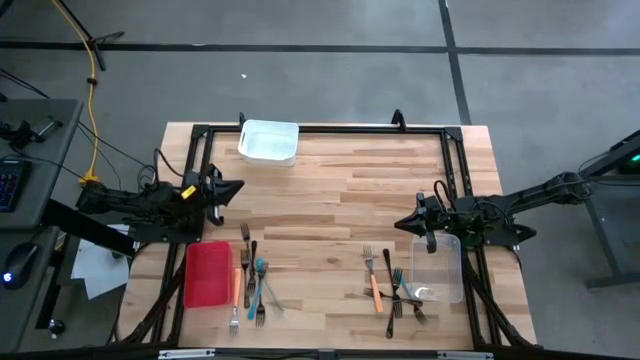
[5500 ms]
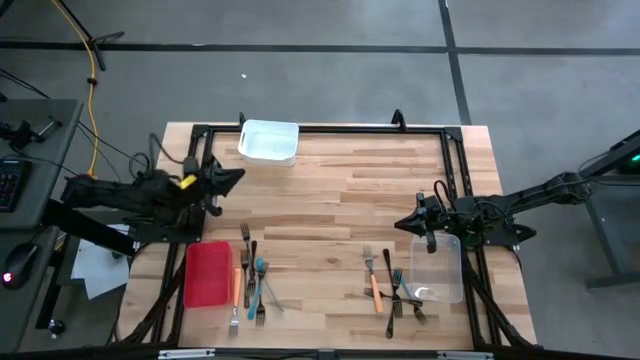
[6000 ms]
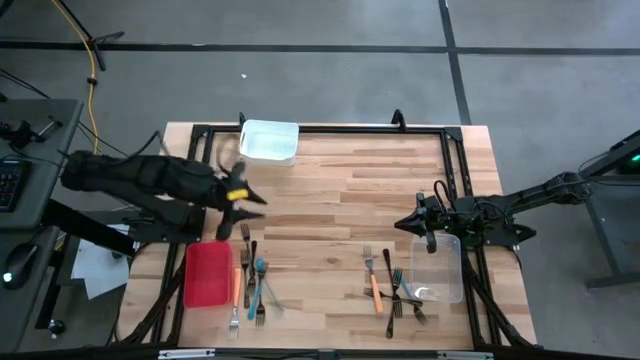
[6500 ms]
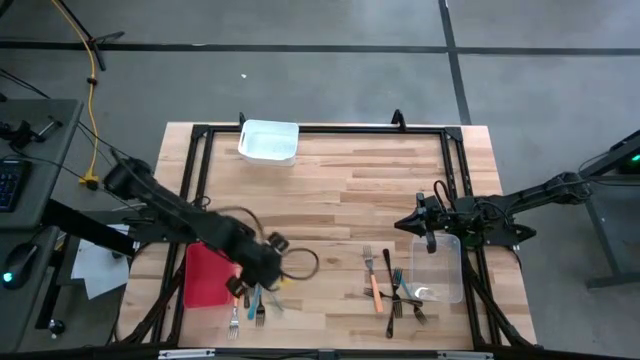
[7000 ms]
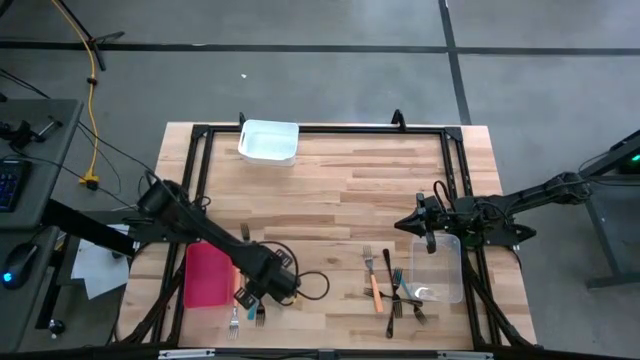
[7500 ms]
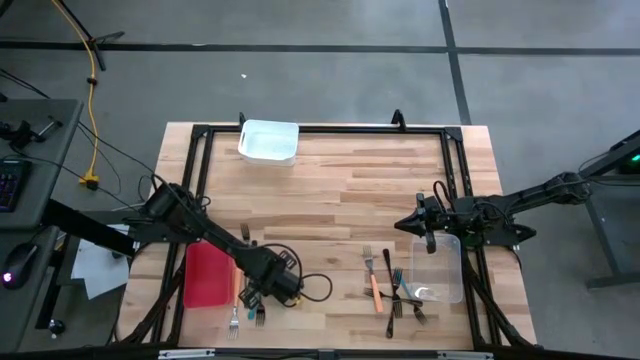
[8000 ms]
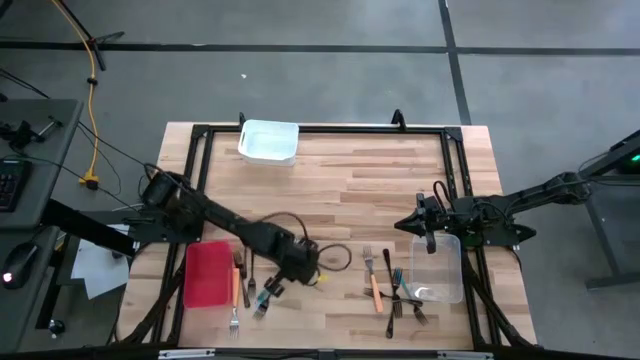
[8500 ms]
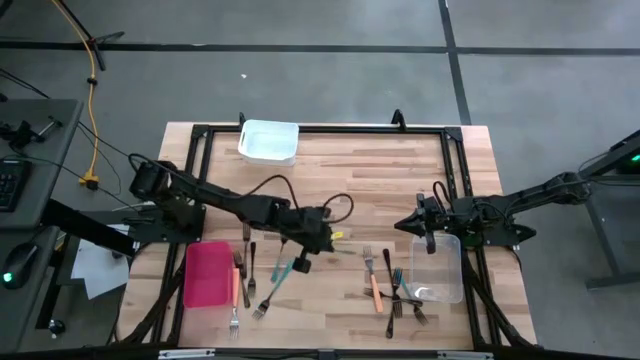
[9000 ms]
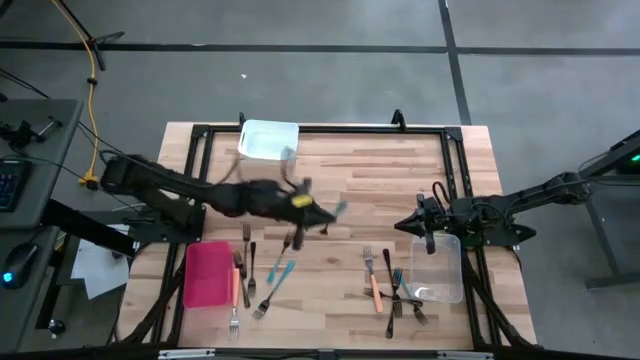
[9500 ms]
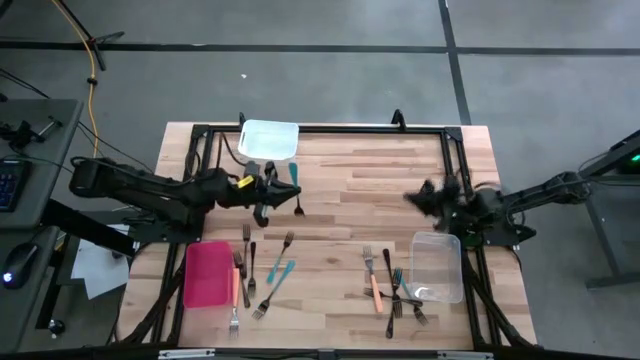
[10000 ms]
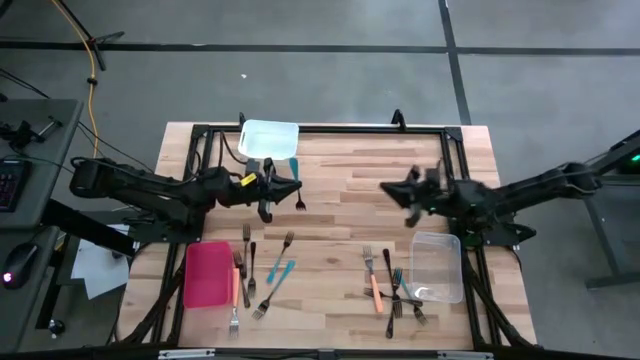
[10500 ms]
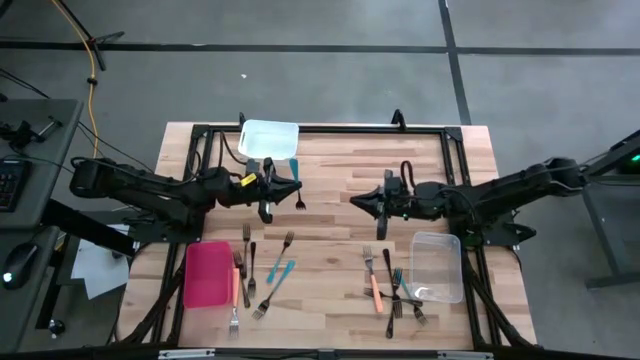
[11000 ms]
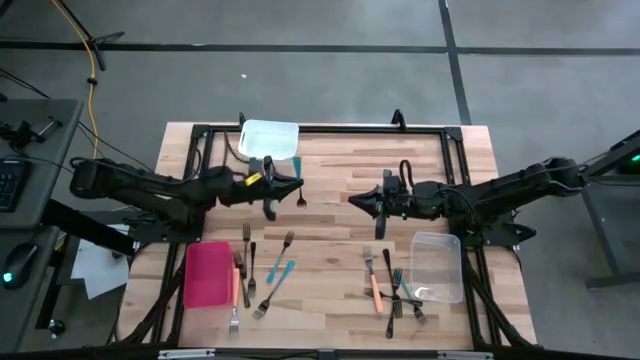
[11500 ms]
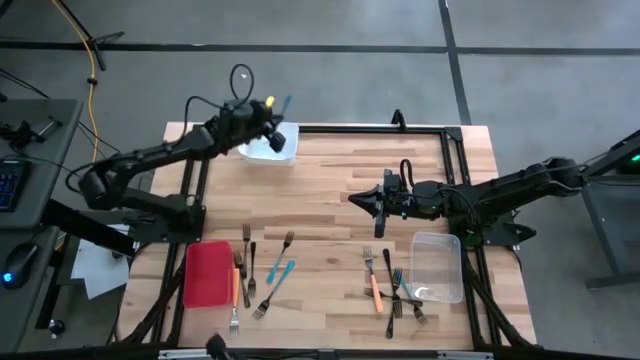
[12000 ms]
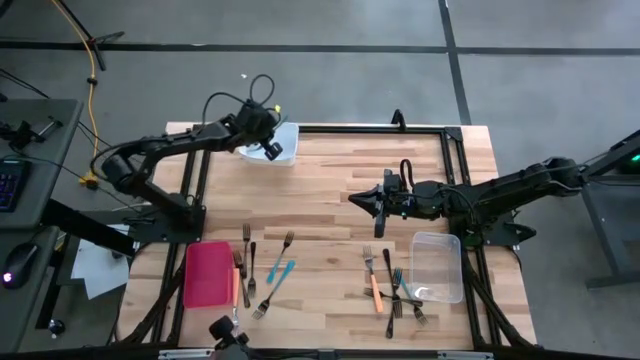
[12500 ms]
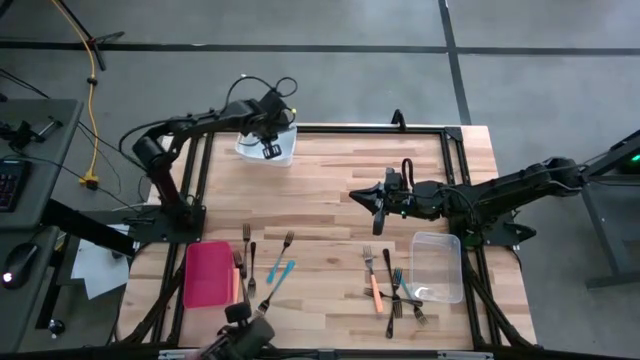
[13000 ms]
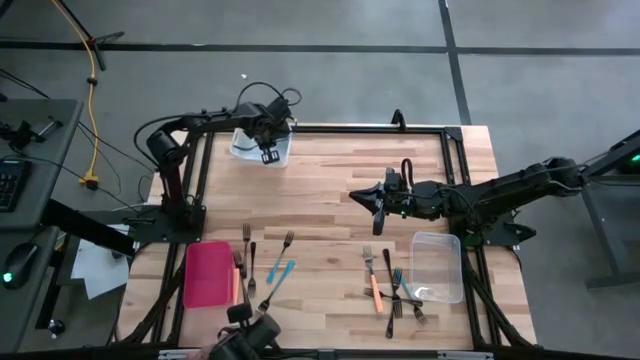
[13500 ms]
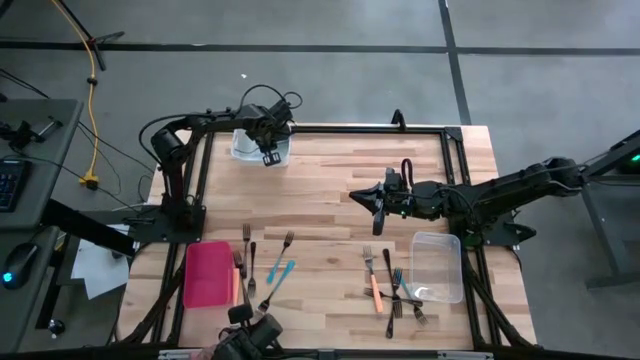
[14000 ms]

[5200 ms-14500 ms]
Task: Sort silverware by color (type)
Put the blue fork into the white bin

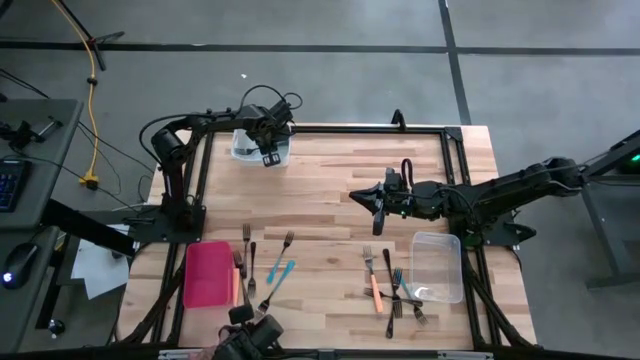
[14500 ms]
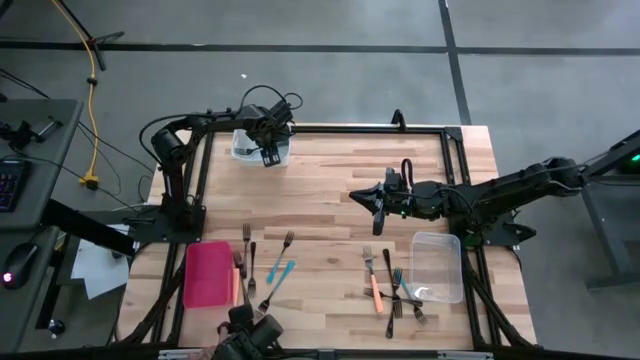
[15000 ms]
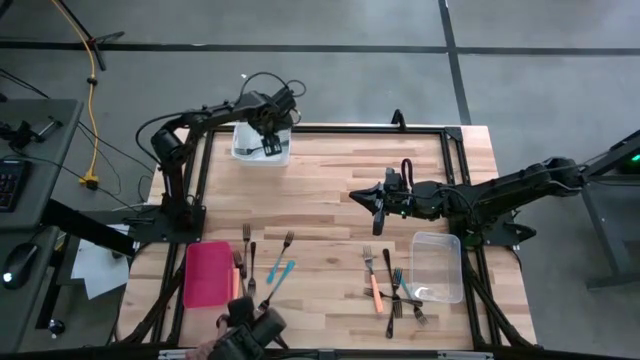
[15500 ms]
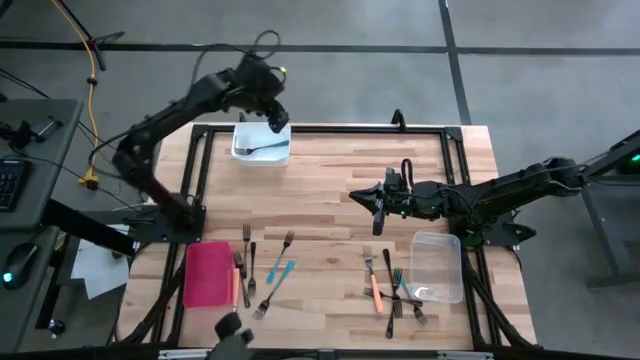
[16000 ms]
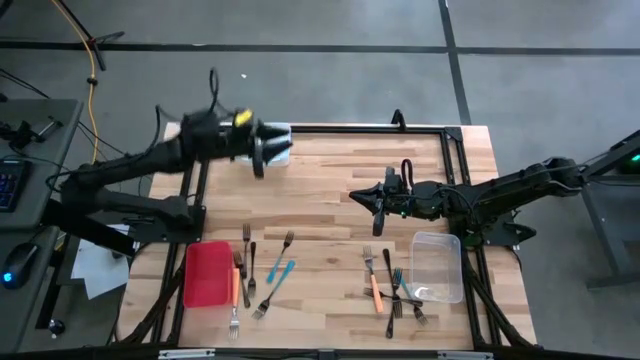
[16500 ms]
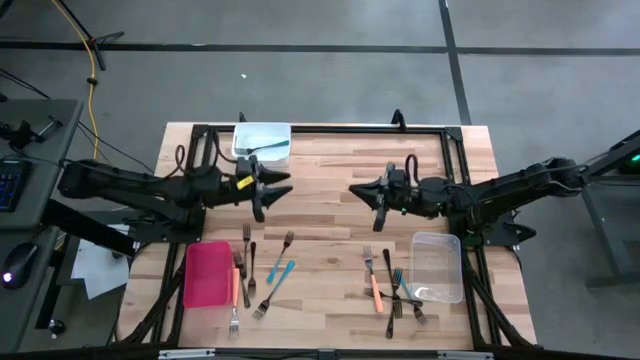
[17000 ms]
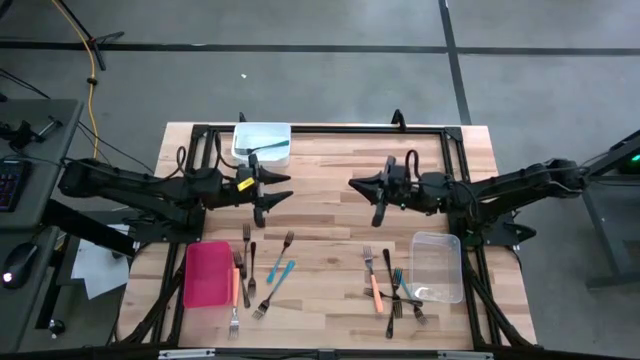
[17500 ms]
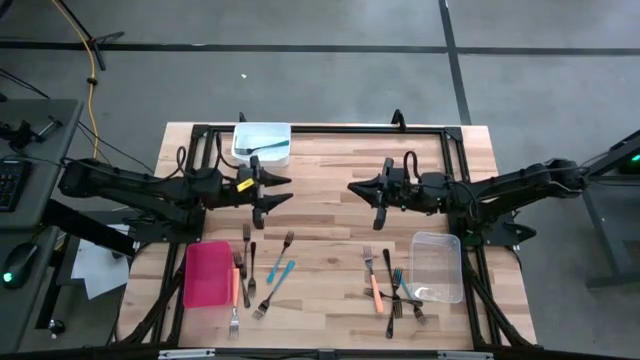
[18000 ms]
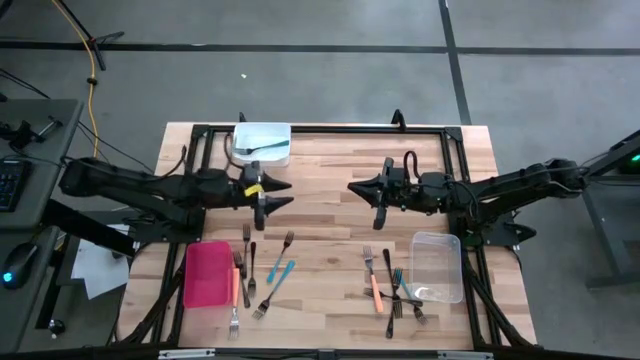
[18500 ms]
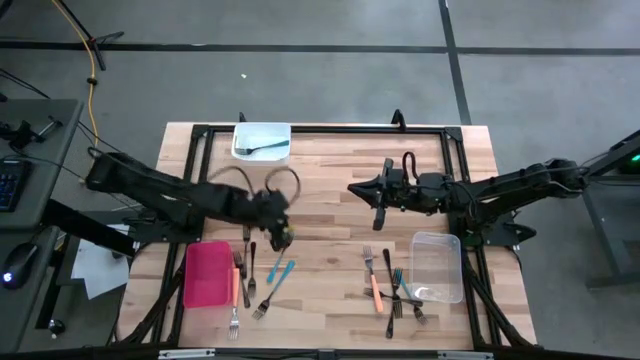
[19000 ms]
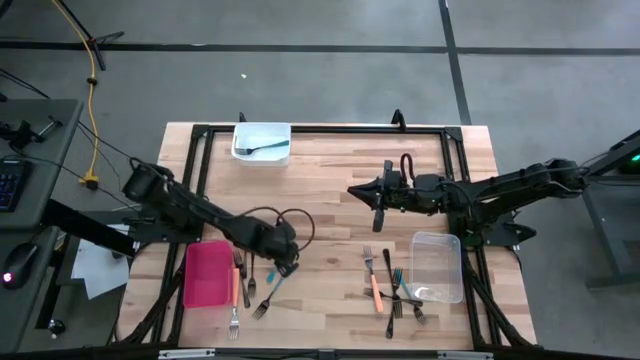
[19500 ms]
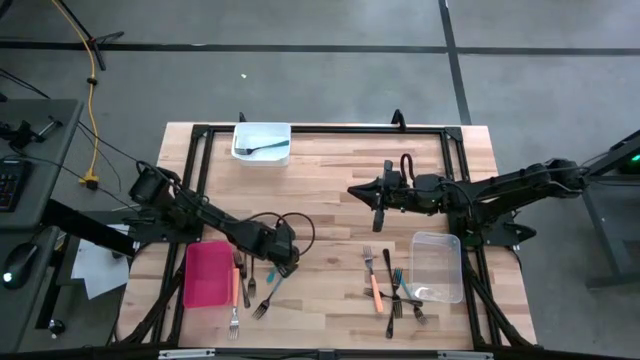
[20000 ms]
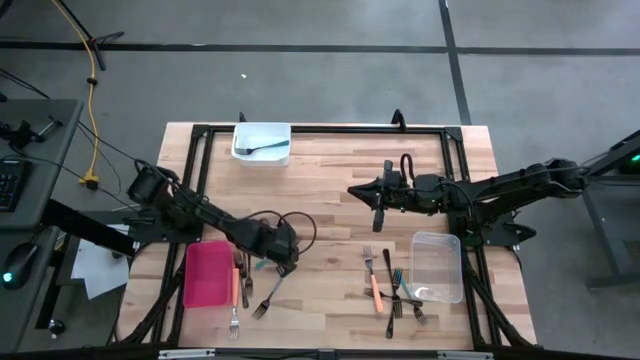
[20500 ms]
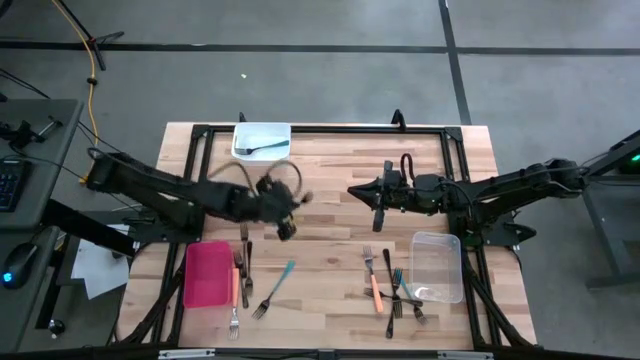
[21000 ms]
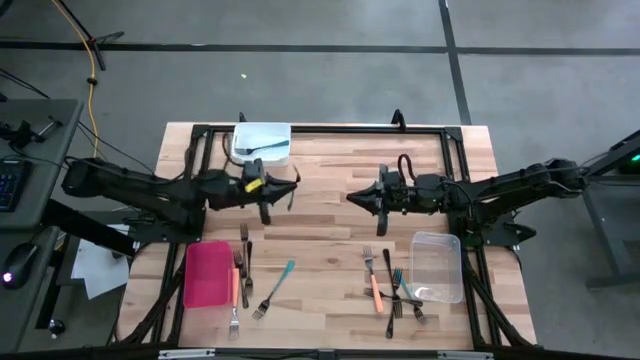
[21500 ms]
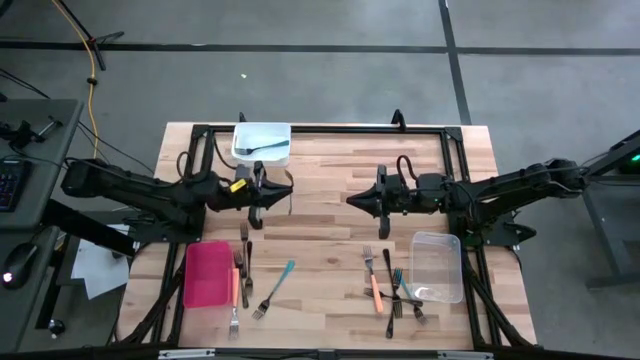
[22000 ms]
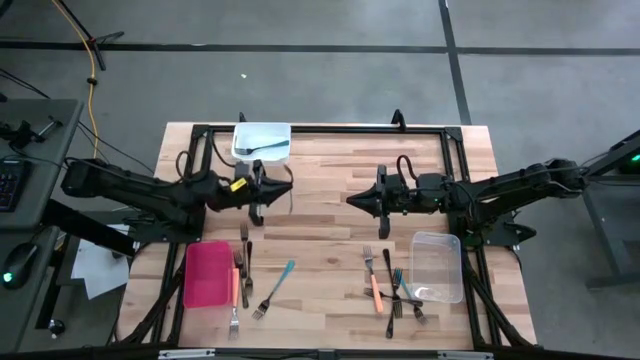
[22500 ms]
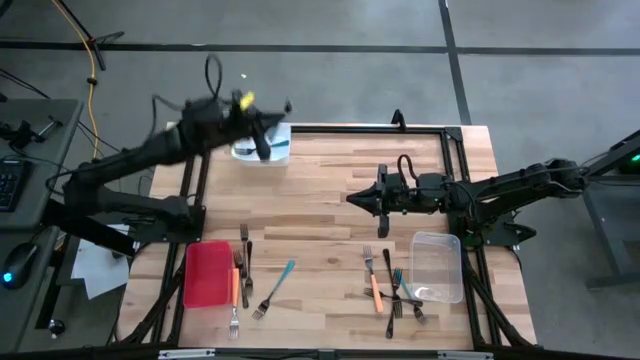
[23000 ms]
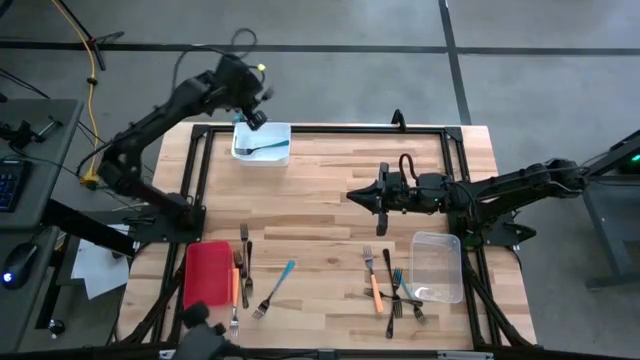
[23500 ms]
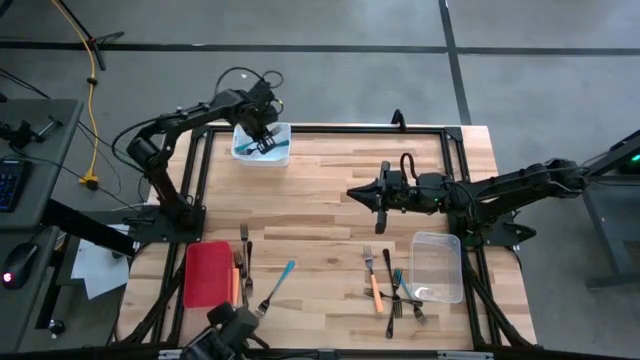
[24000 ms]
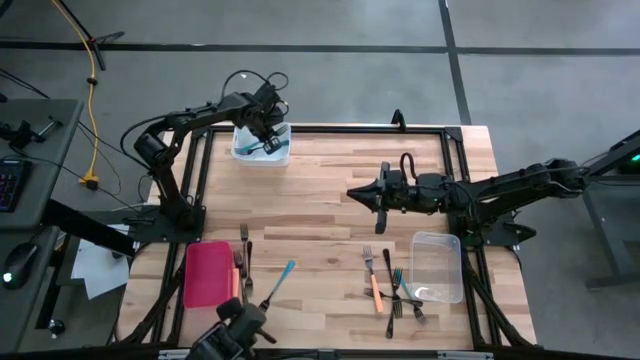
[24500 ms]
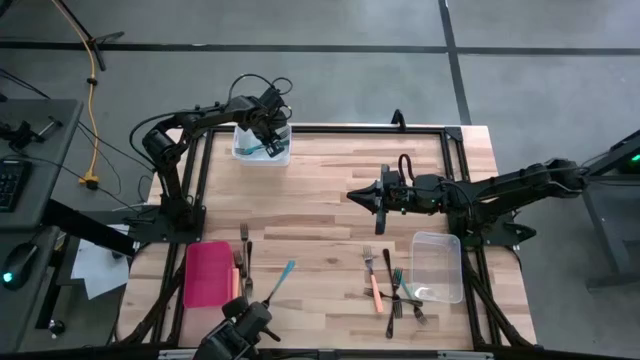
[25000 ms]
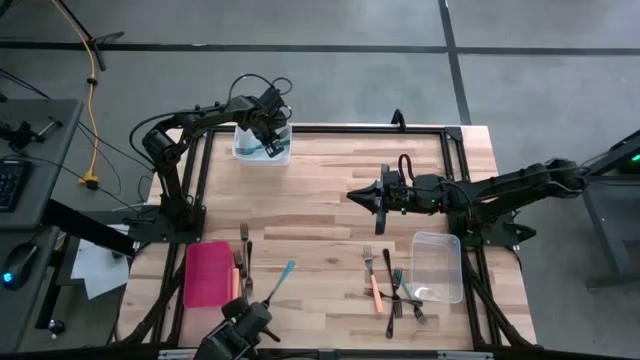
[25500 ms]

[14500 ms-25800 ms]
Put the blue fork into the white bin
